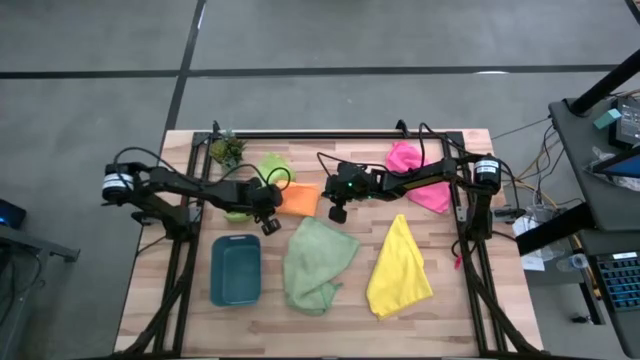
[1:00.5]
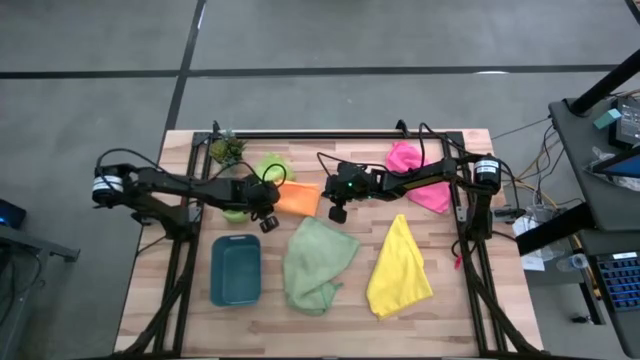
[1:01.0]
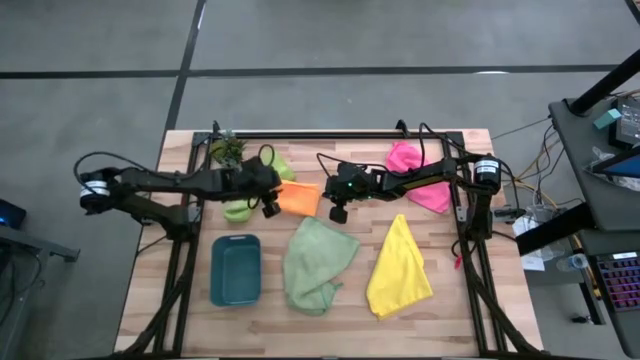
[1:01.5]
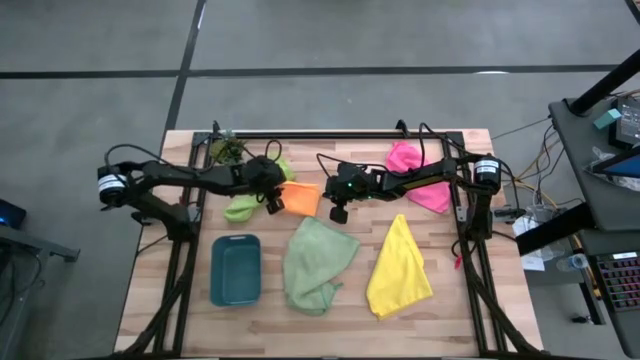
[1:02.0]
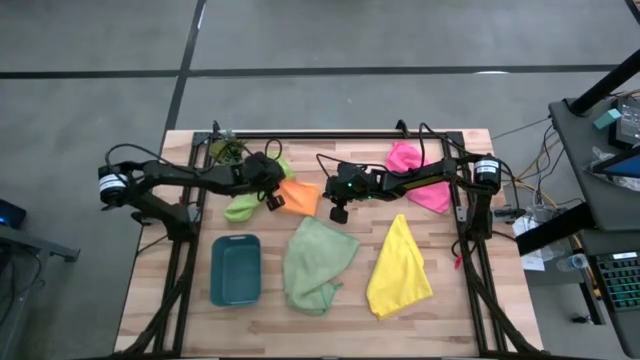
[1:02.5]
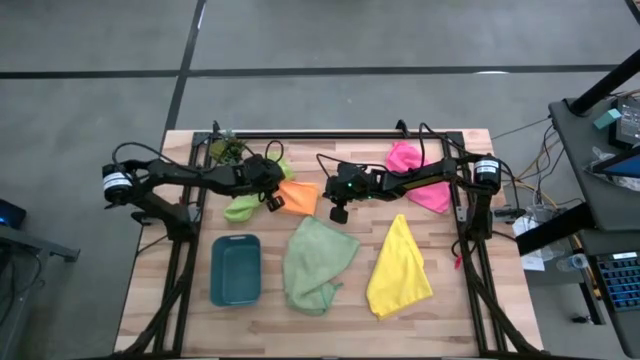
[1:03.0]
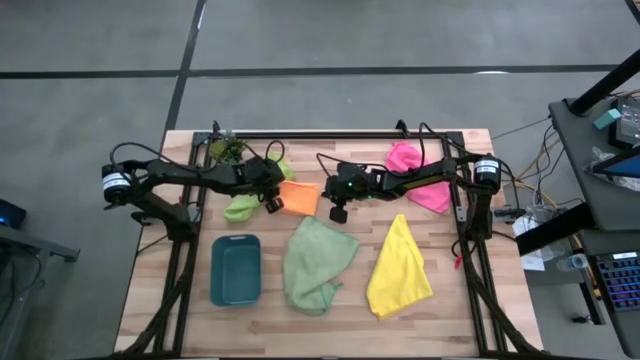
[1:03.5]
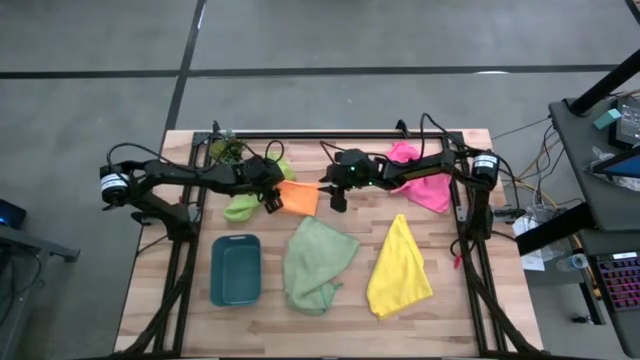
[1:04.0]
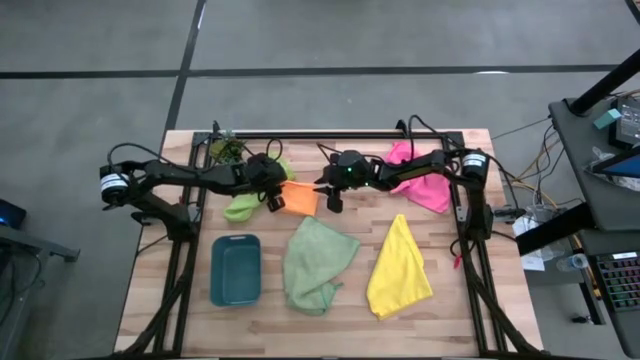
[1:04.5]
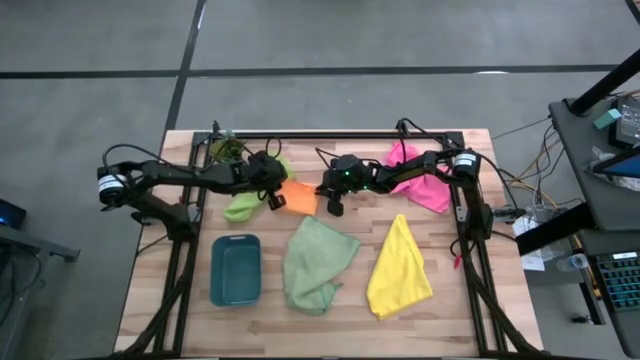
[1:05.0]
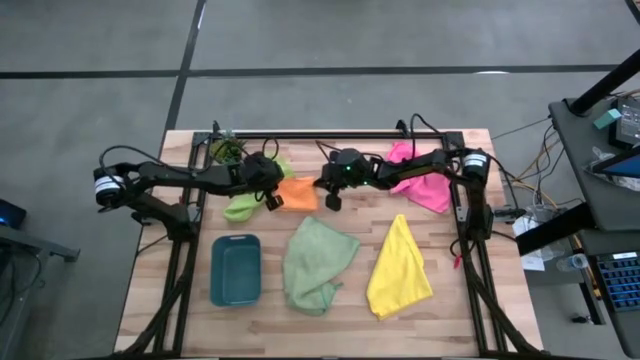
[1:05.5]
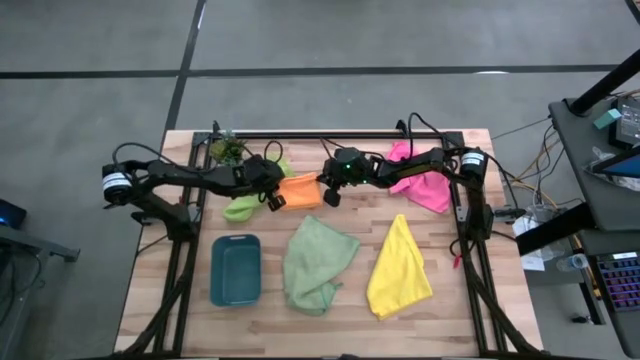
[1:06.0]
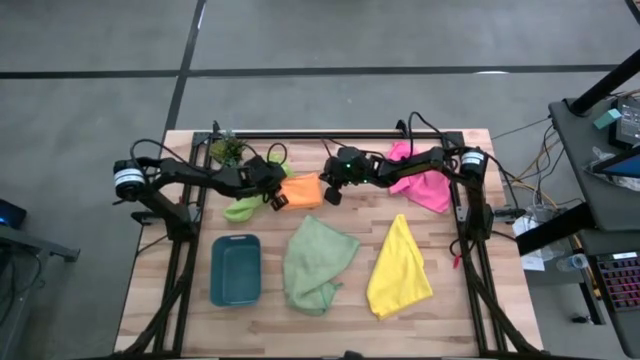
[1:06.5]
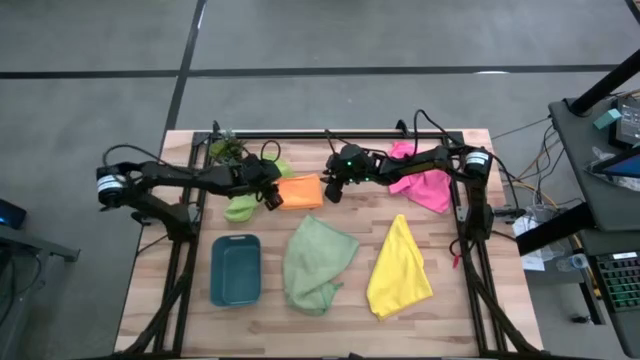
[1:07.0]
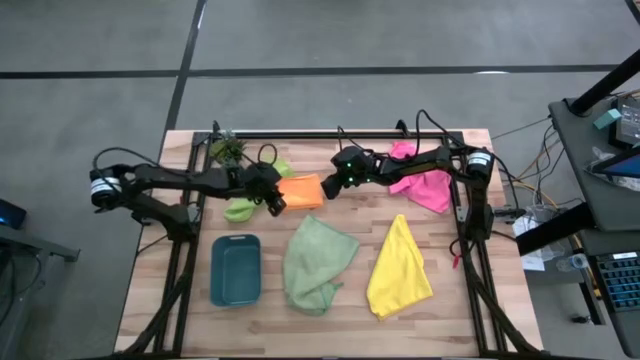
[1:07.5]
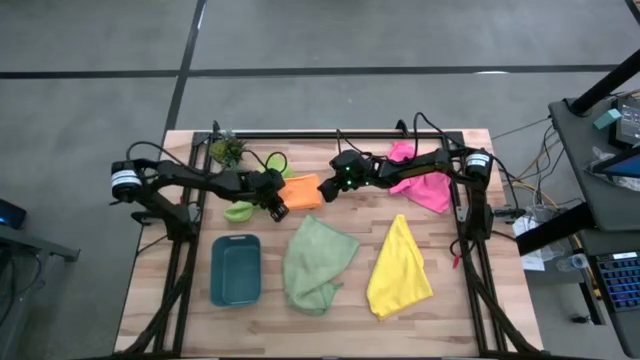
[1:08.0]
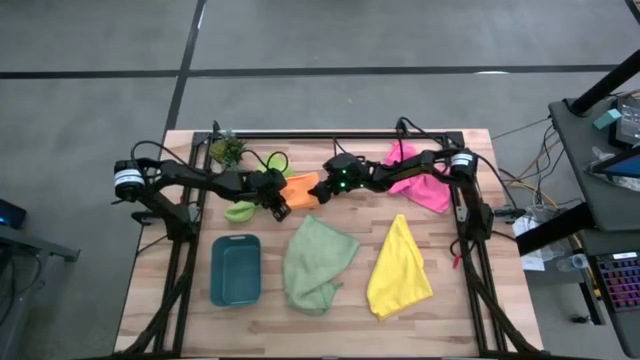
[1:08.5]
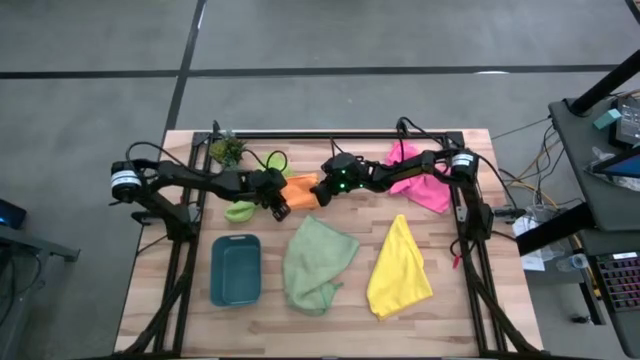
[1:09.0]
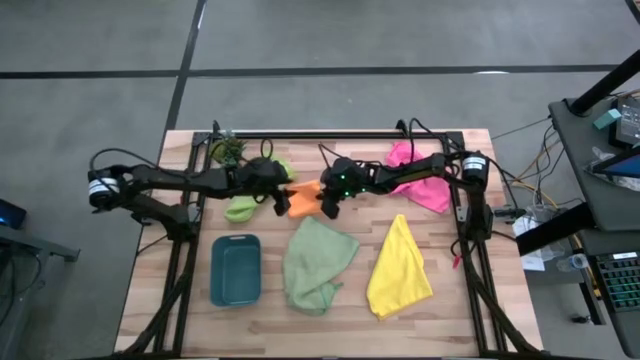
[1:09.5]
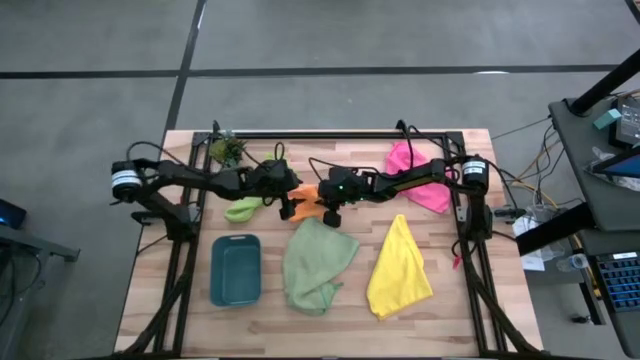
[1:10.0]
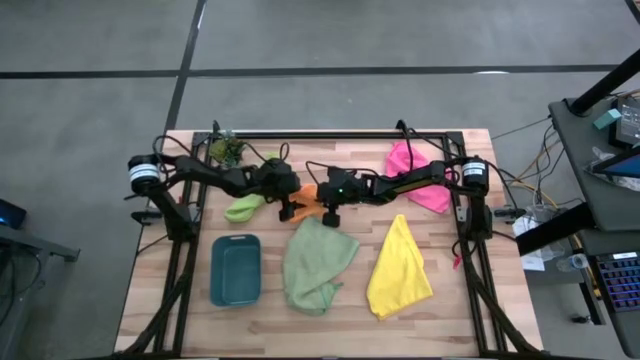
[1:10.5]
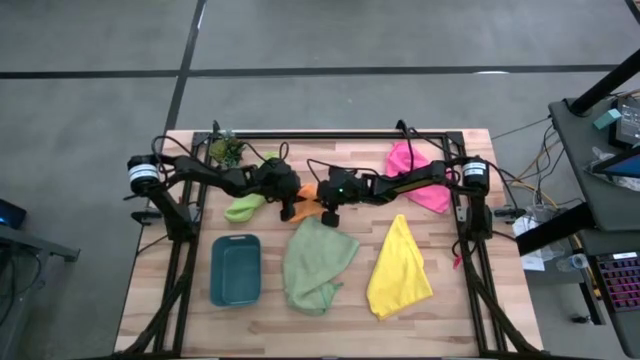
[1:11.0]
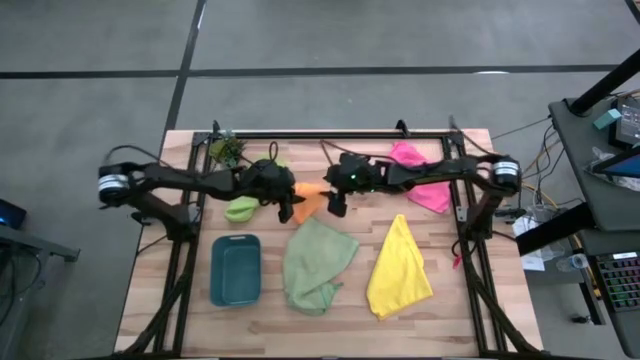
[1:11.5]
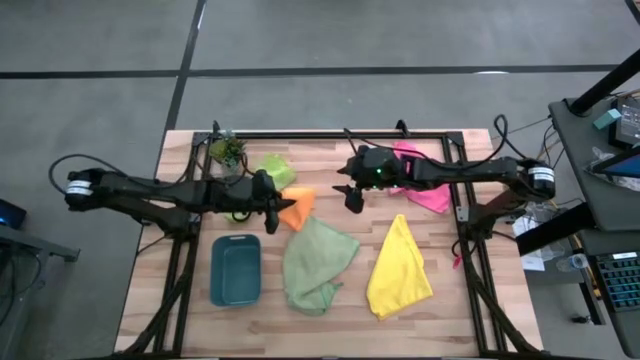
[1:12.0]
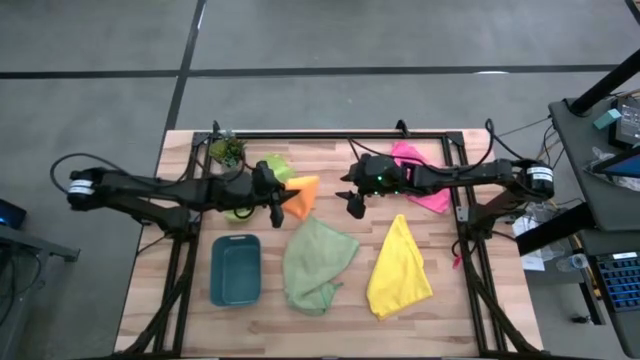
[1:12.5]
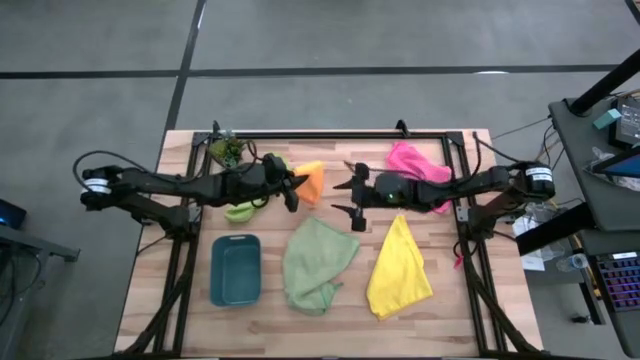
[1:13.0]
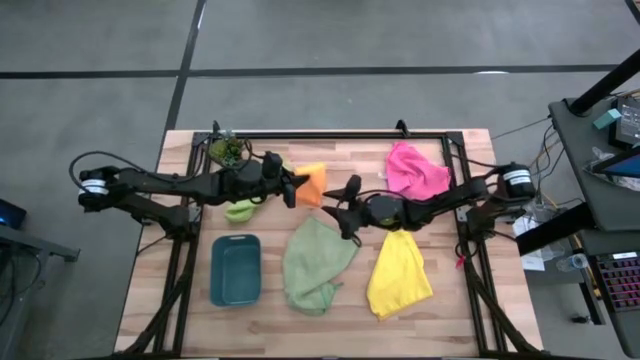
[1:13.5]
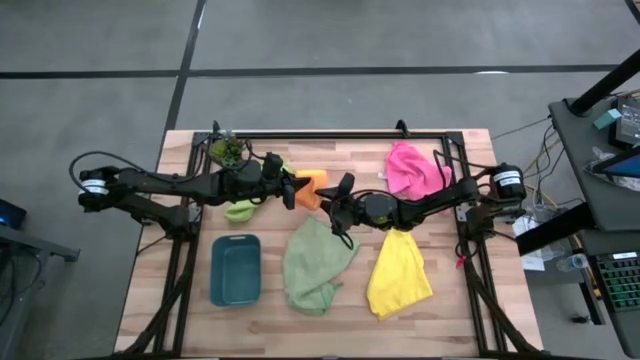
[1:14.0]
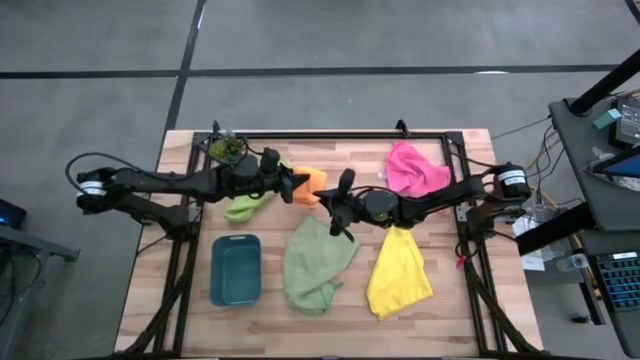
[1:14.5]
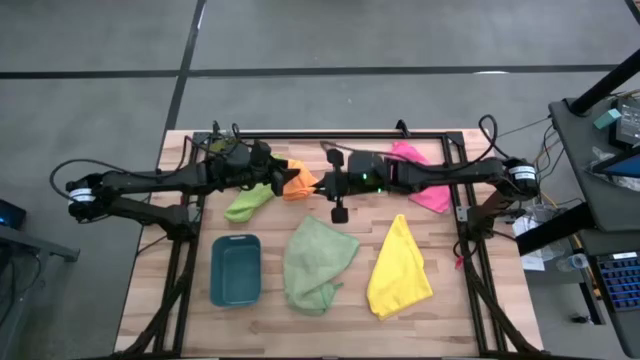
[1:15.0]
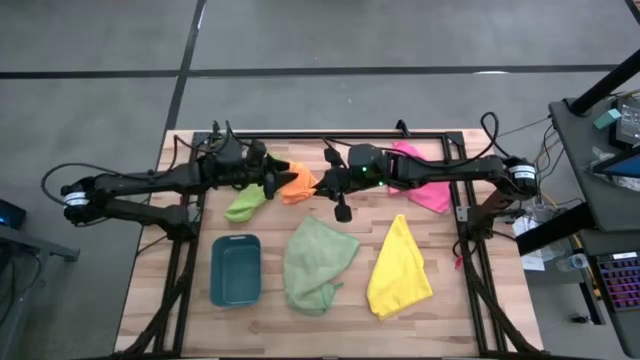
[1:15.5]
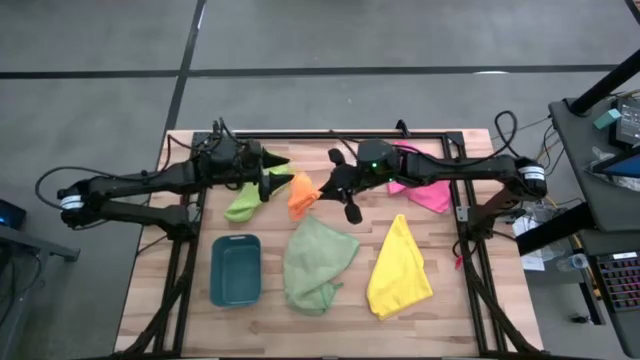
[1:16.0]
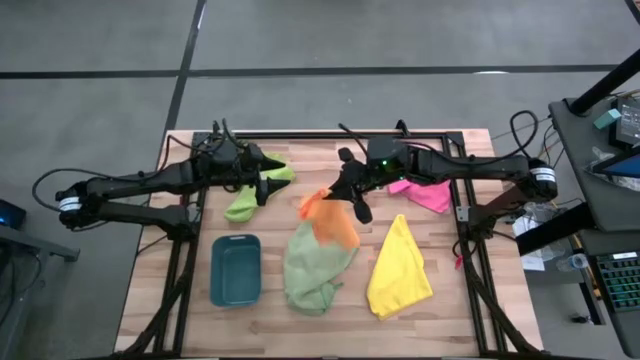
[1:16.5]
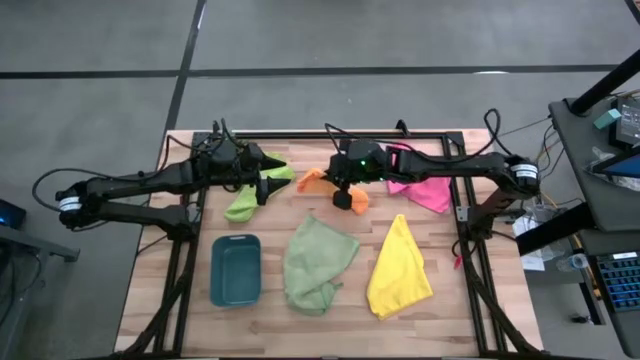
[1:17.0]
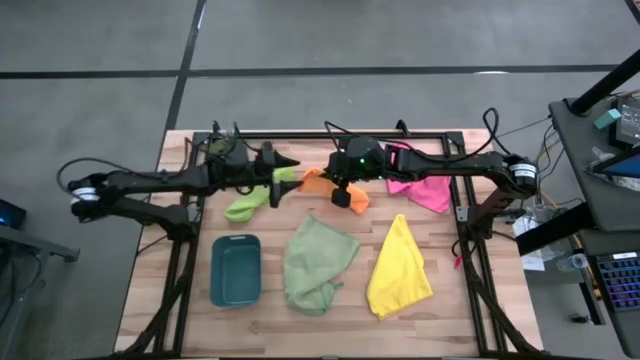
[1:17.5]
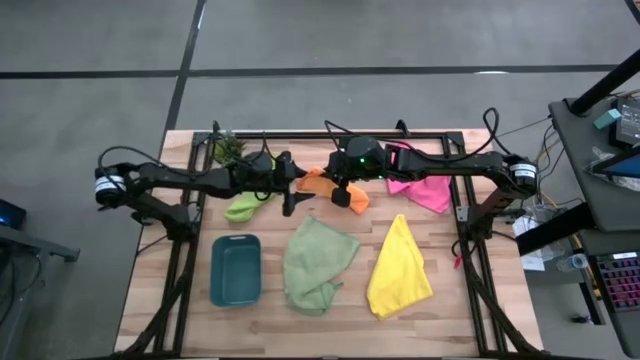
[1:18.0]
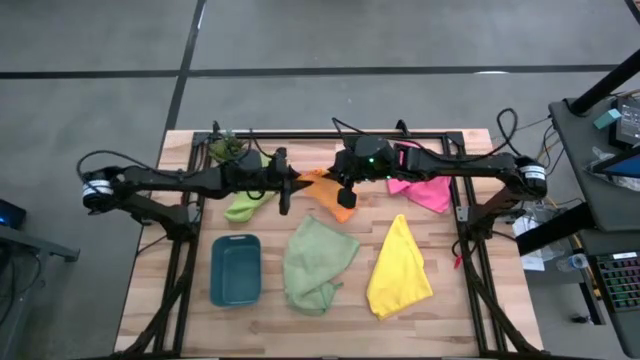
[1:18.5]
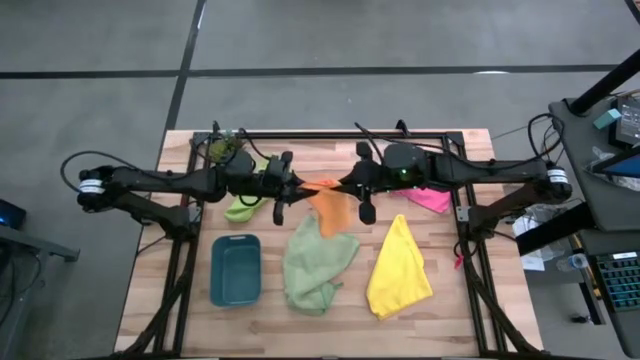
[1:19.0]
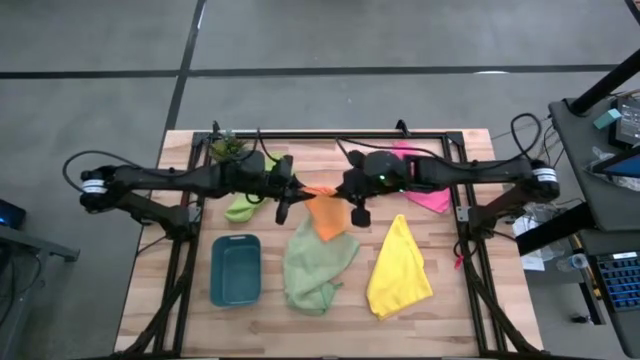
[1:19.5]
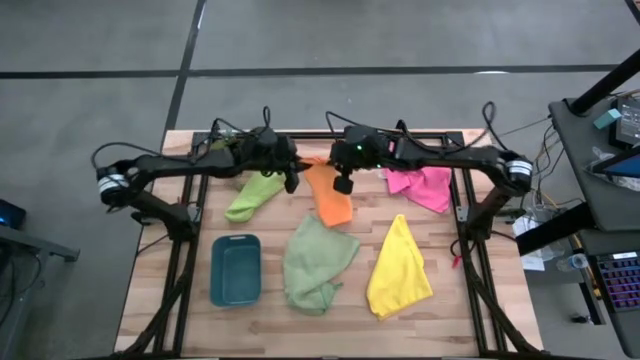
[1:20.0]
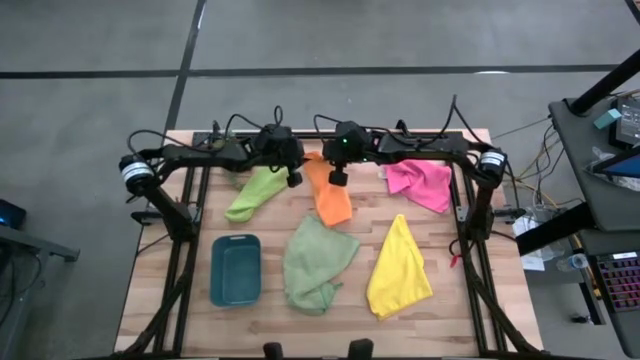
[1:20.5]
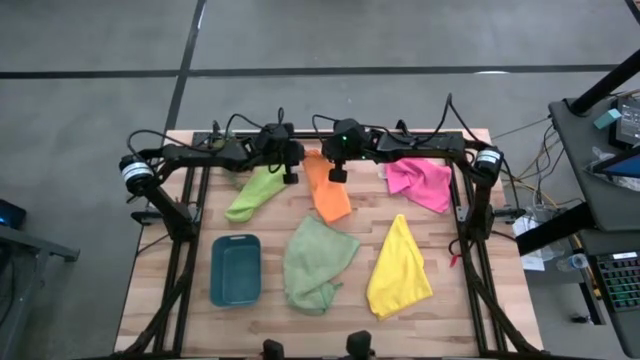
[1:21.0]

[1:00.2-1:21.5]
Task: Fold microfiber towels
Fold the orange microfiber cloth

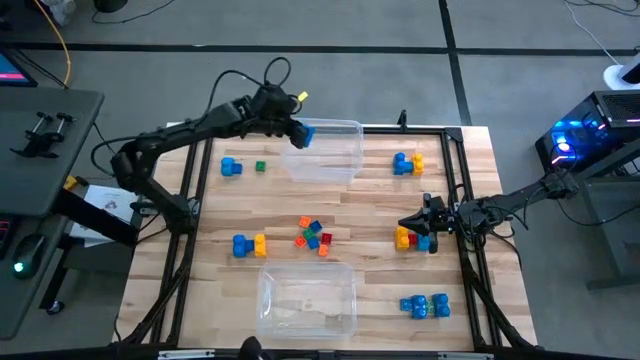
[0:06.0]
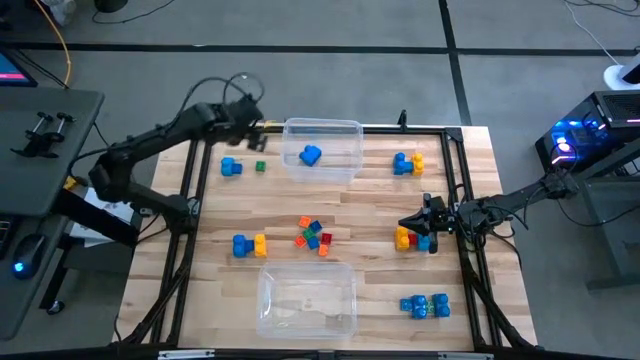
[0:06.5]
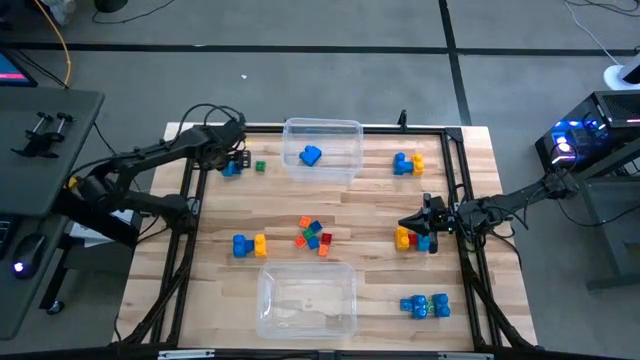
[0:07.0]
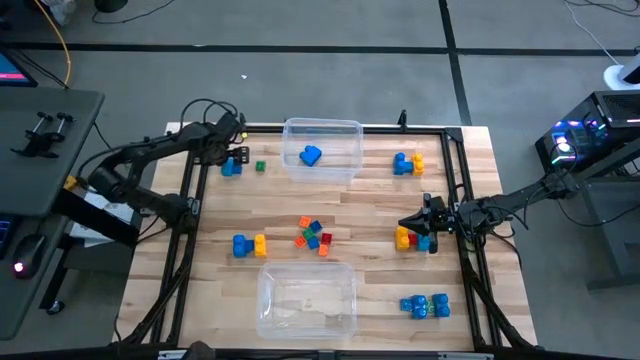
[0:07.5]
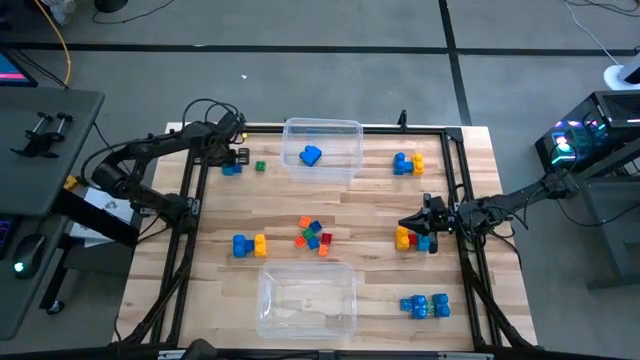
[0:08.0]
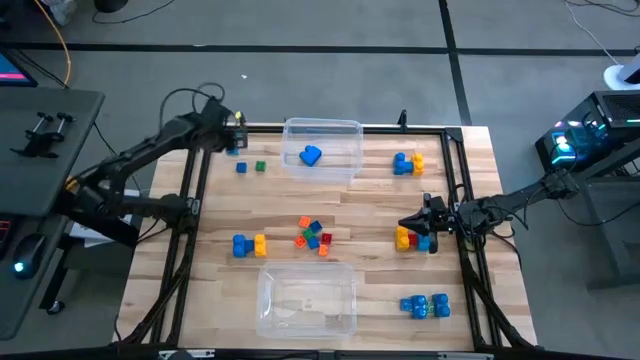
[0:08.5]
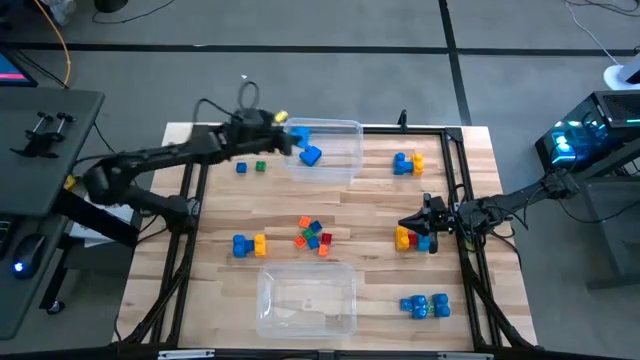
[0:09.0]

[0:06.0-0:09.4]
Task: Sort blocks by size
Put the large blue game piece into the top transparent bin
